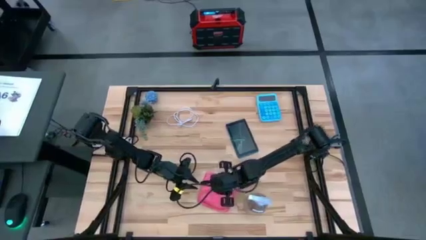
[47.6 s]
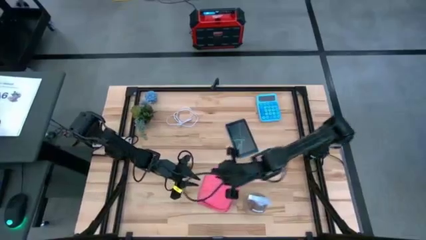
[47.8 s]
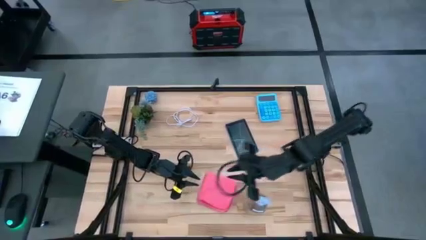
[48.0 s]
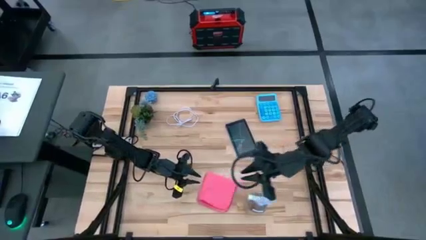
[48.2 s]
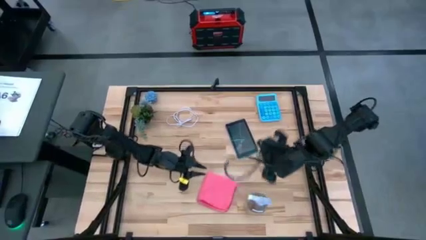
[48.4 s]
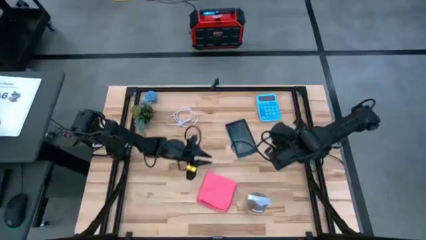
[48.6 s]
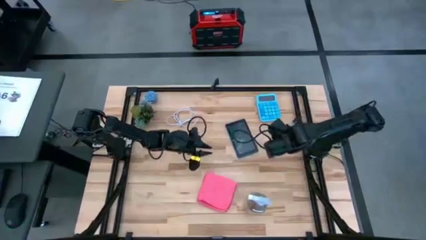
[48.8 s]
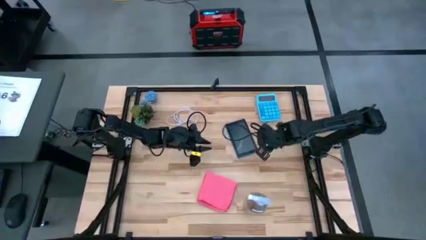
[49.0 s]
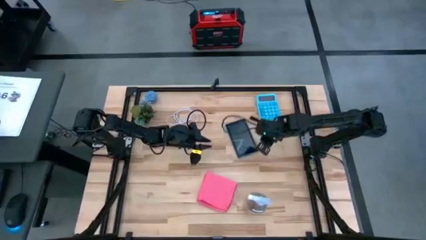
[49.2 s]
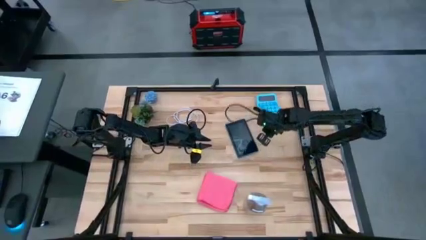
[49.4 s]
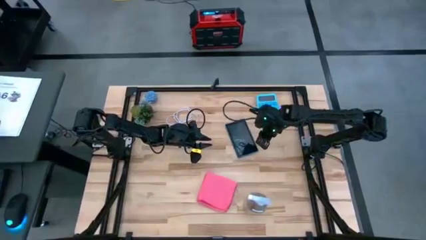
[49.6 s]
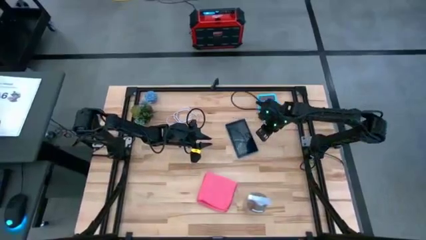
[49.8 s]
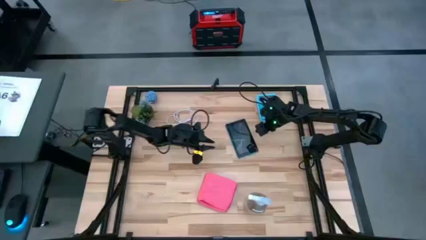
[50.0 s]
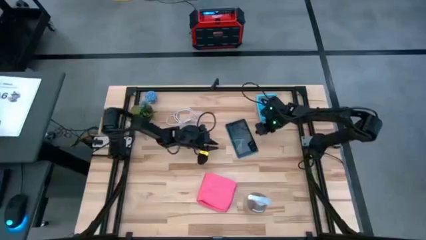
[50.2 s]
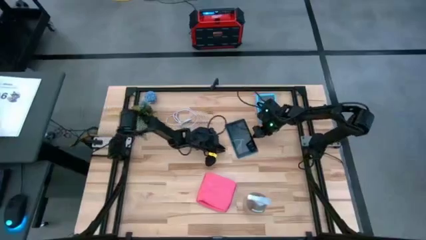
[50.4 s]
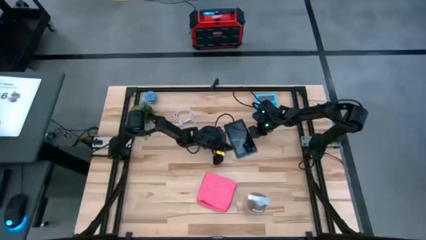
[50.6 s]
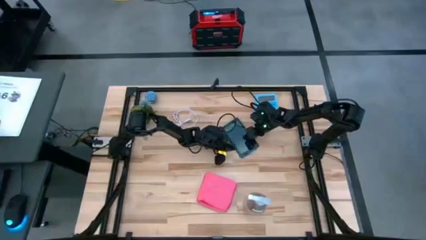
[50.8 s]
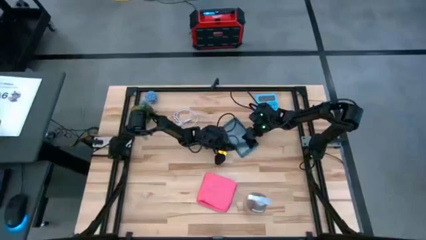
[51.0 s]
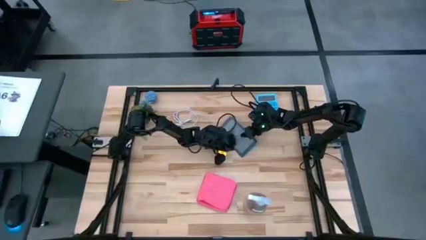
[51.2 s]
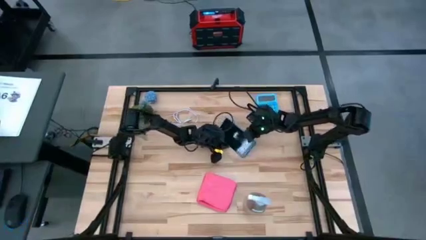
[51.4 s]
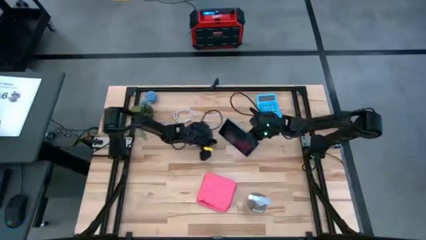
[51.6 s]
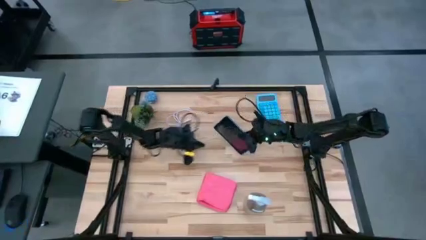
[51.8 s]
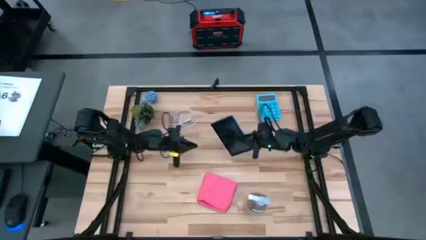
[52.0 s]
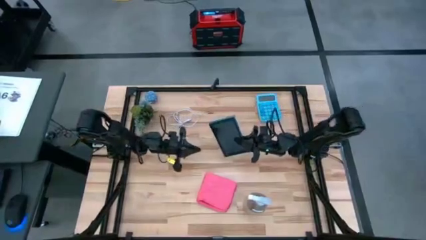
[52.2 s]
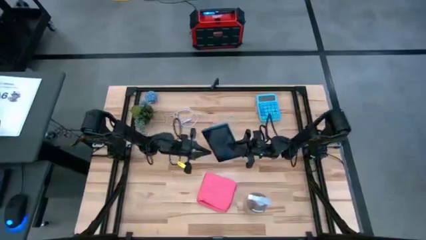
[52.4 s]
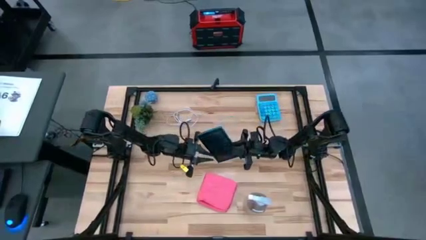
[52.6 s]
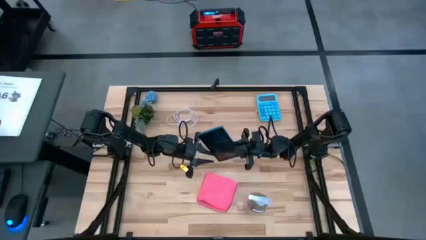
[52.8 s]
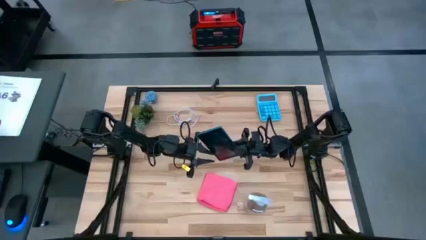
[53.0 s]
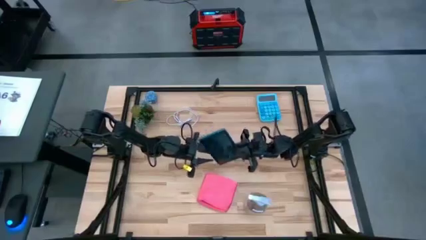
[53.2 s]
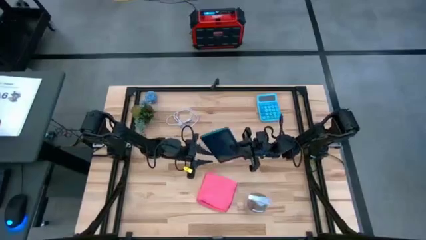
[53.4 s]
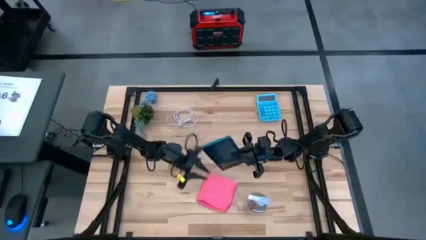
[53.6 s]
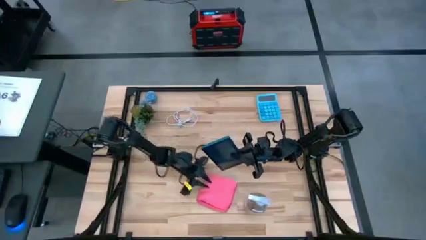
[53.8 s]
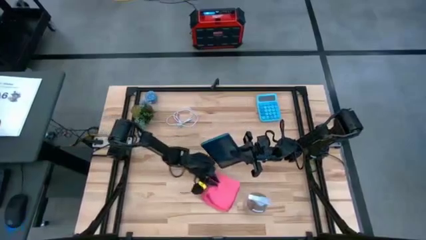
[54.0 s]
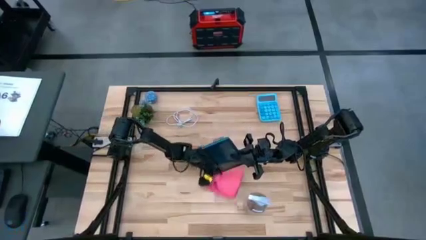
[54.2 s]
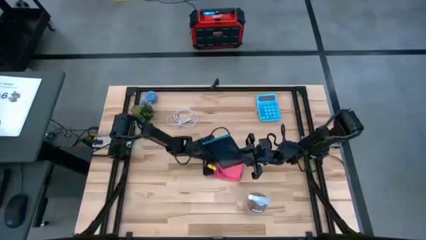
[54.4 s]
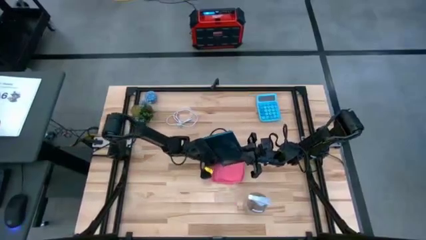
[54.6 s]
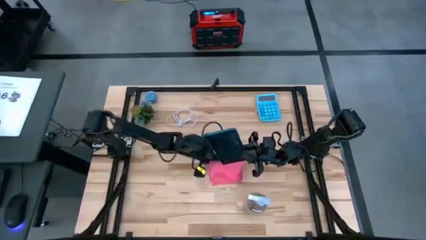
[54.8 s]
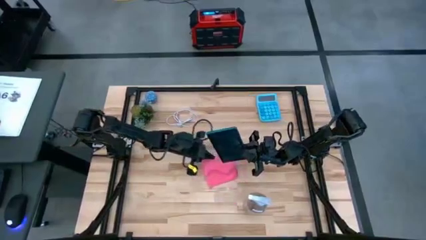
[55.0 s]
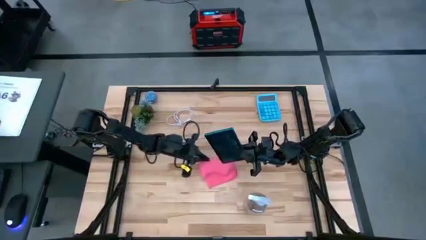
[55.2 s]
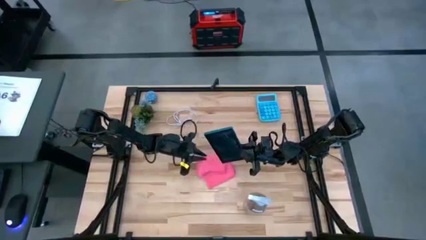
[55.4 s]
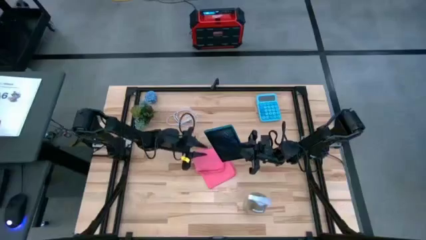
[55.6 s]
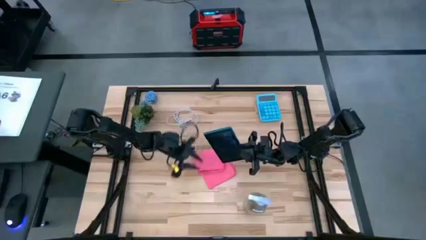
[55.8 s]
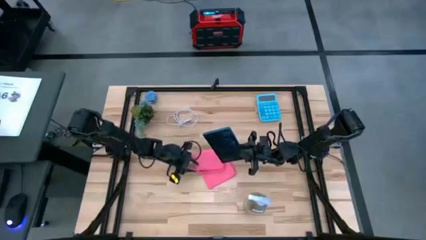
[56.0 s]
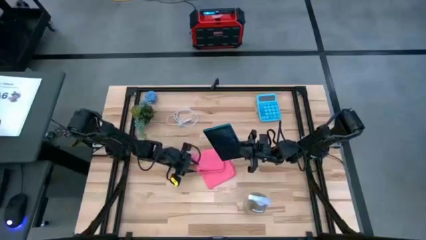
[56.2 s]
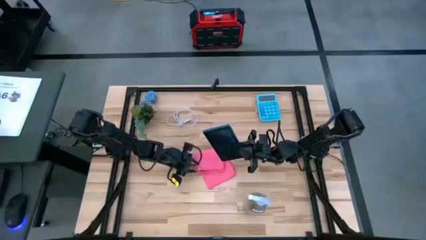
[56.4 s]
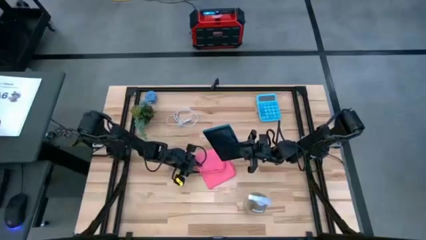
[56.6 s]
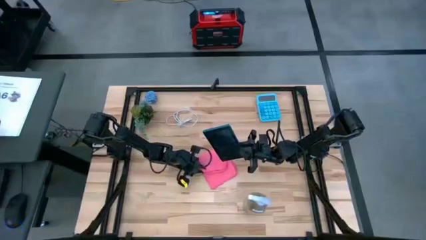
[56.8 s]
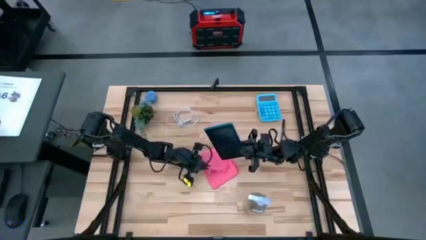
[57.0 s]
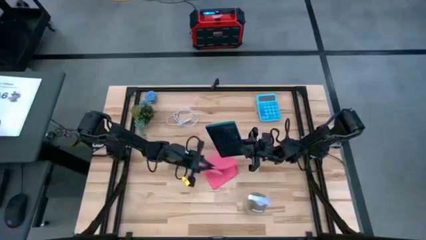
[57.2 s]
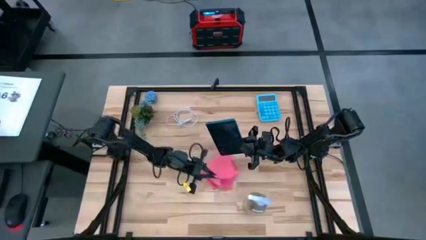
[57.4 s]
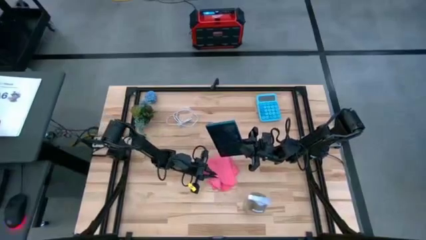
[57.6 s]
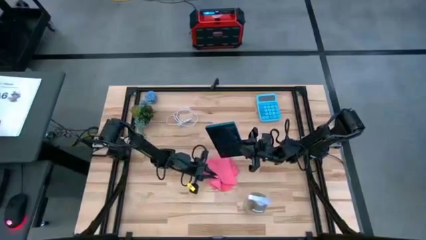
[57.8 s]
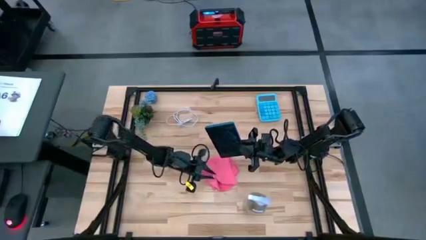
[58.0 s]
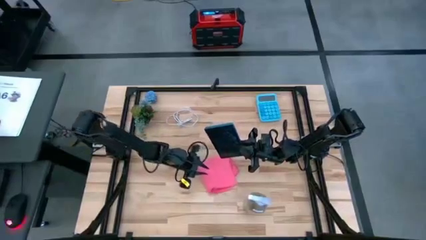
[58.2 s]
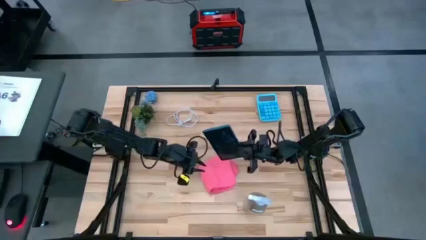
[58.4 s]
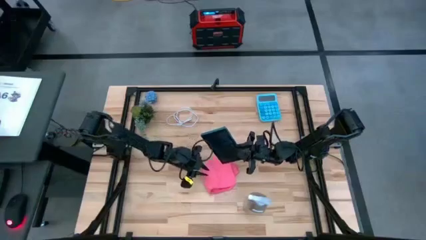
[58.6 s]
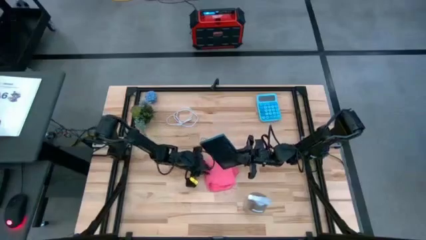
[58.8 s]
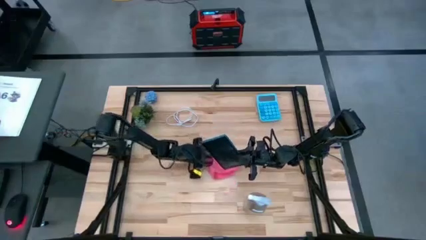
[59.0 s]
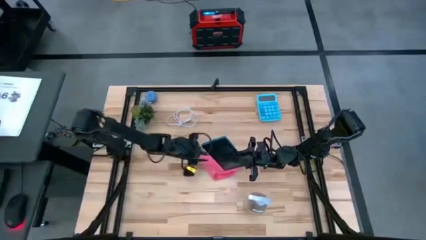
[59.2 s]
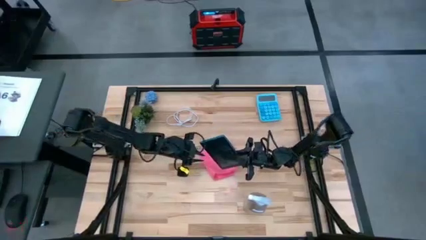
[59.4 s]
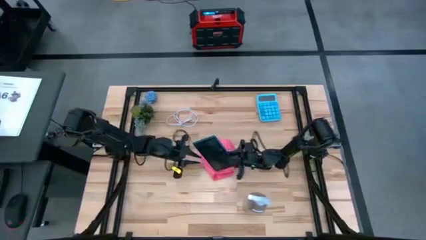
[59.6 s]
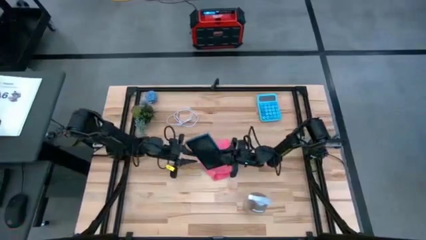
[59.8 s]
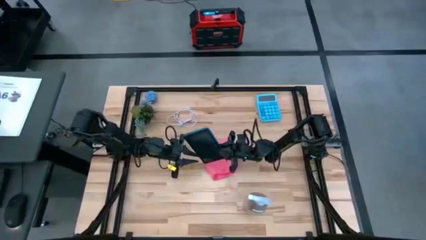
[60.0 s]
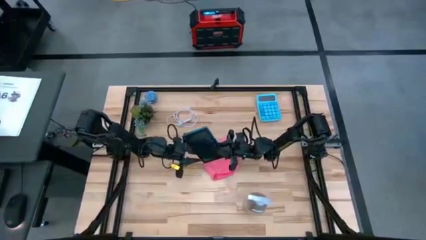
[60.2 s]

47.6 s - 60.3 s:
Task: Apply microfiber cloth
Spray the front of the cellphone using the spray bottle
